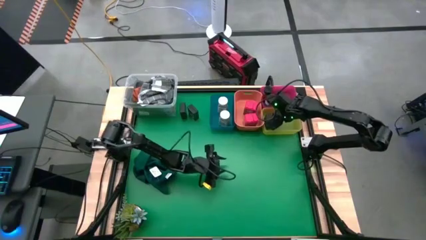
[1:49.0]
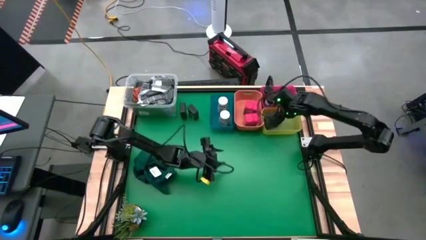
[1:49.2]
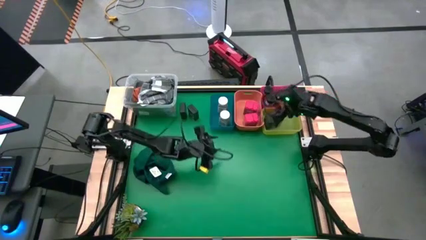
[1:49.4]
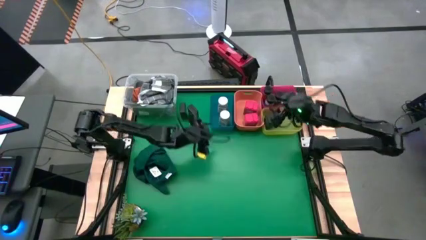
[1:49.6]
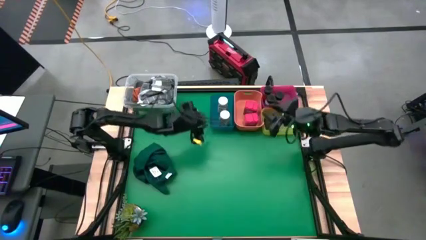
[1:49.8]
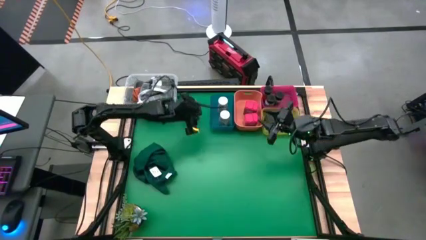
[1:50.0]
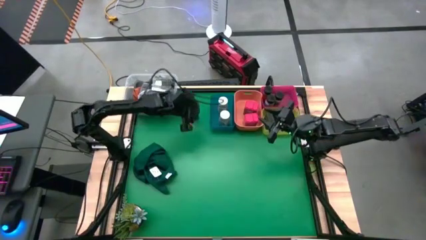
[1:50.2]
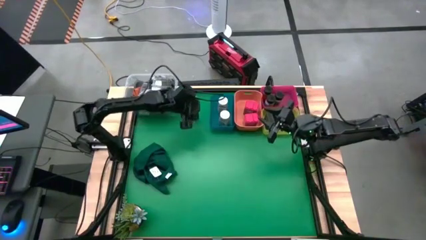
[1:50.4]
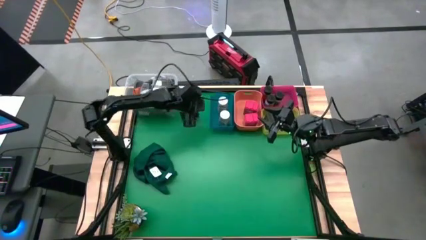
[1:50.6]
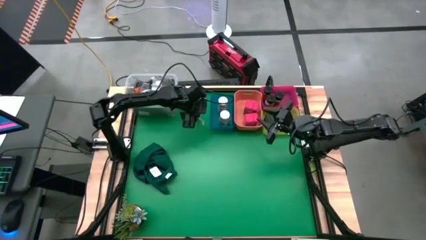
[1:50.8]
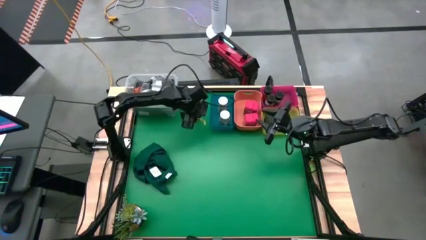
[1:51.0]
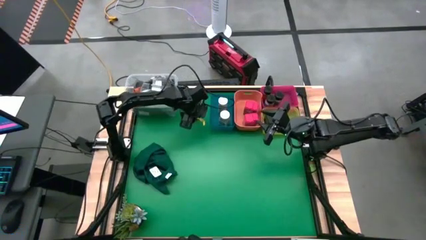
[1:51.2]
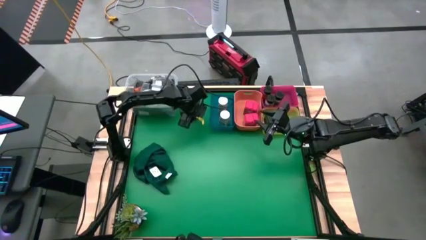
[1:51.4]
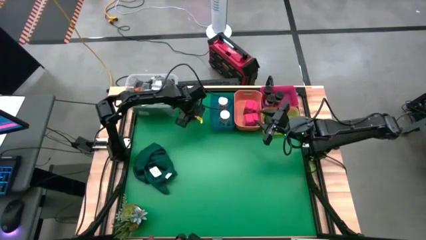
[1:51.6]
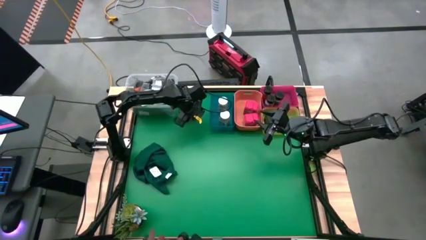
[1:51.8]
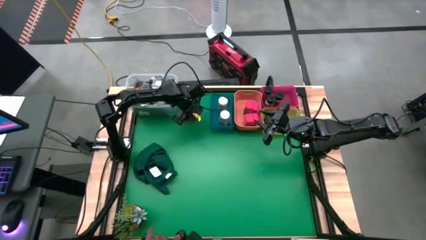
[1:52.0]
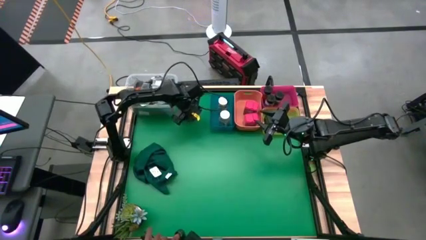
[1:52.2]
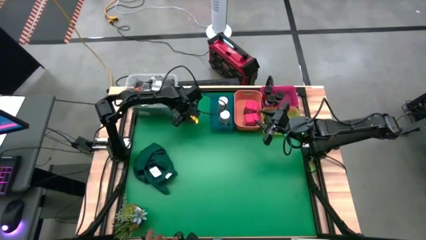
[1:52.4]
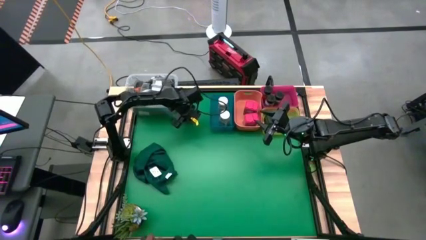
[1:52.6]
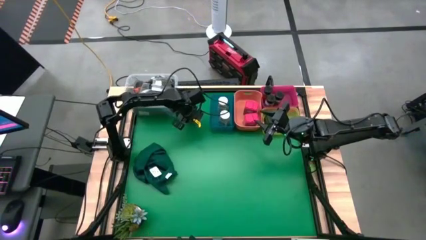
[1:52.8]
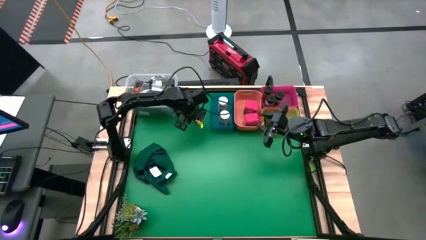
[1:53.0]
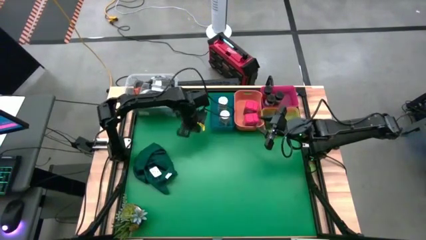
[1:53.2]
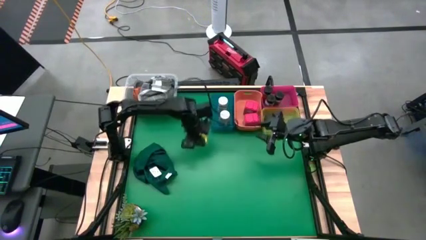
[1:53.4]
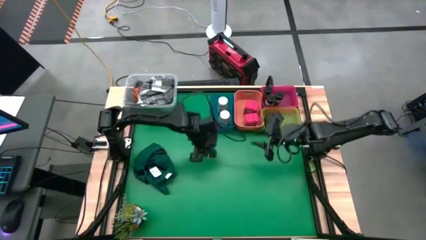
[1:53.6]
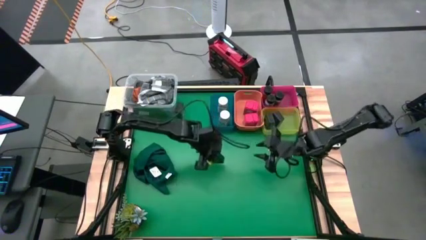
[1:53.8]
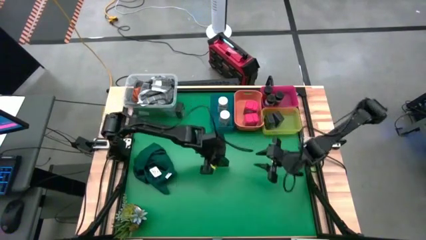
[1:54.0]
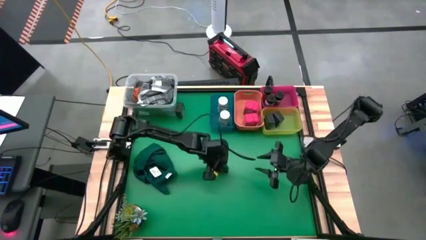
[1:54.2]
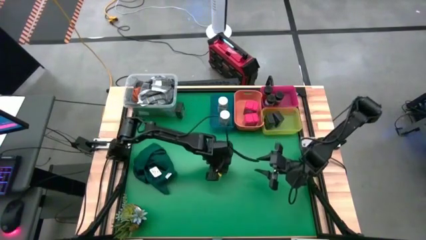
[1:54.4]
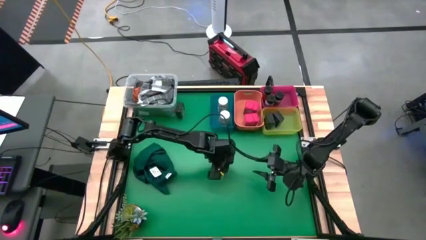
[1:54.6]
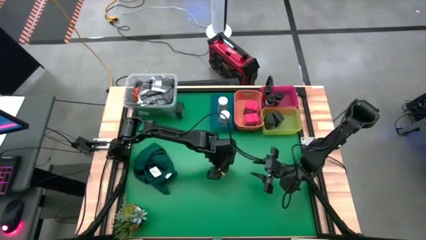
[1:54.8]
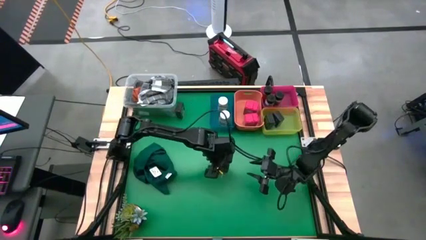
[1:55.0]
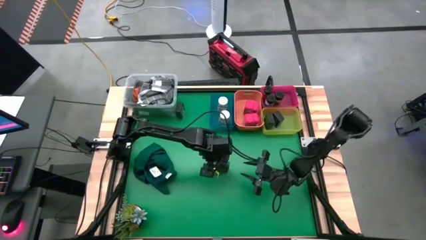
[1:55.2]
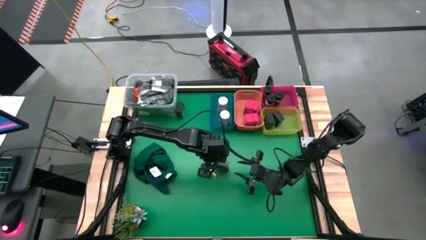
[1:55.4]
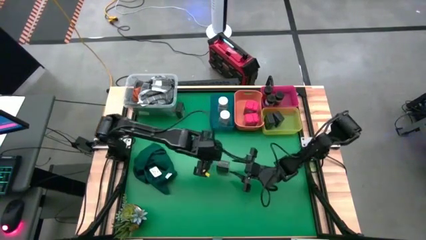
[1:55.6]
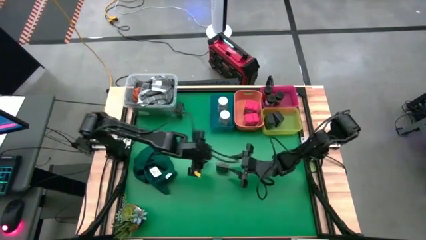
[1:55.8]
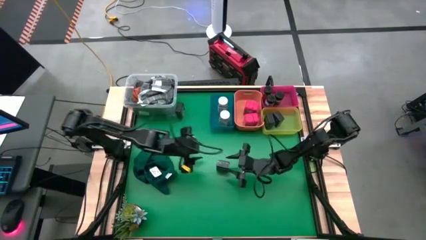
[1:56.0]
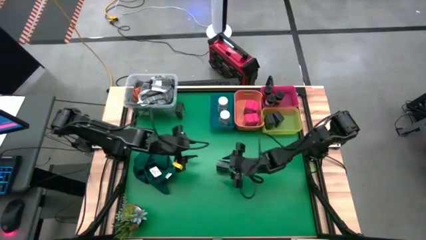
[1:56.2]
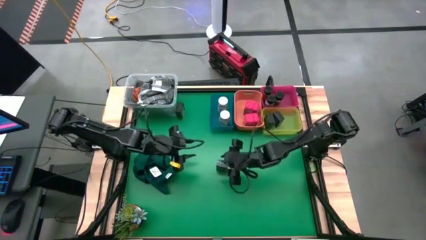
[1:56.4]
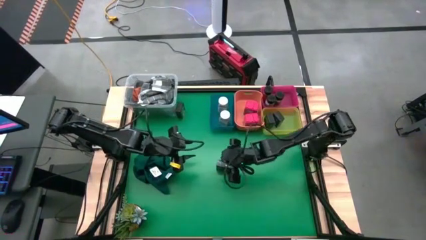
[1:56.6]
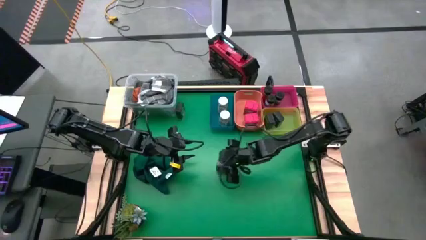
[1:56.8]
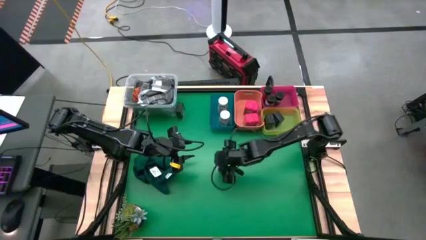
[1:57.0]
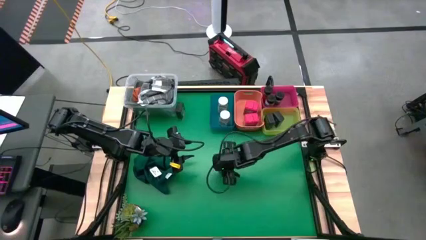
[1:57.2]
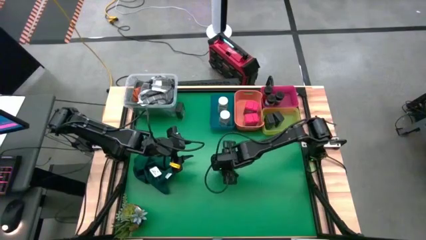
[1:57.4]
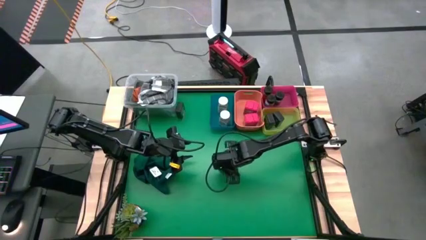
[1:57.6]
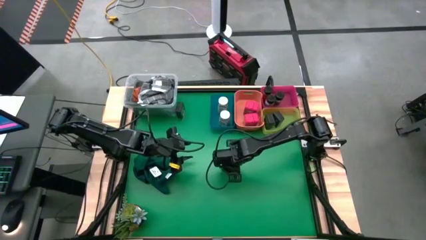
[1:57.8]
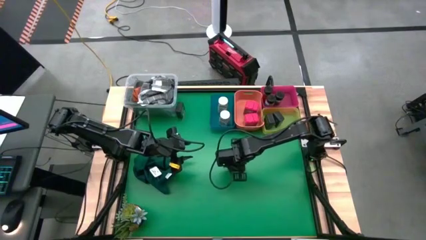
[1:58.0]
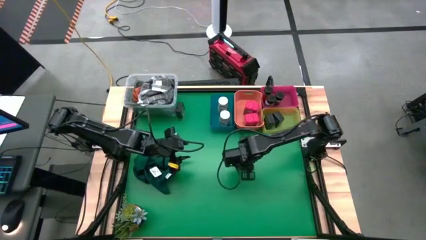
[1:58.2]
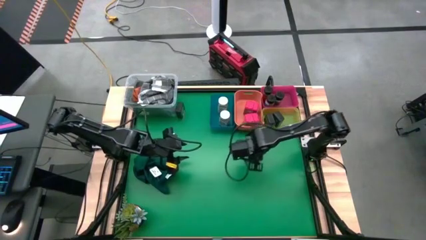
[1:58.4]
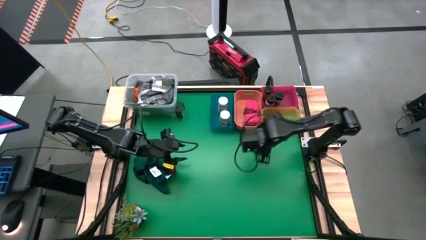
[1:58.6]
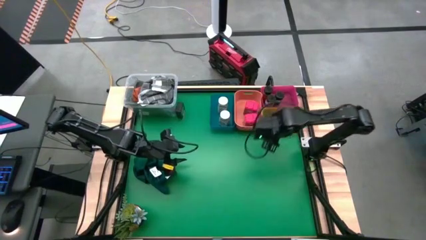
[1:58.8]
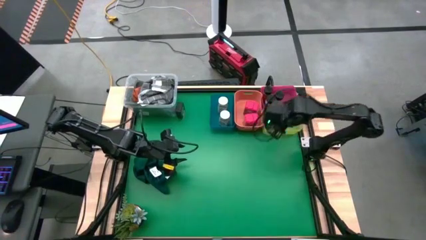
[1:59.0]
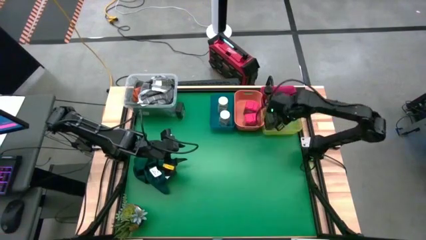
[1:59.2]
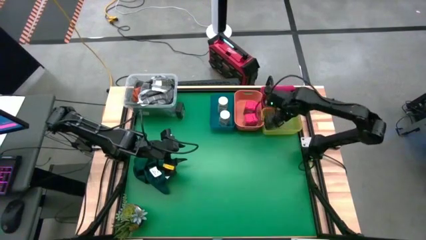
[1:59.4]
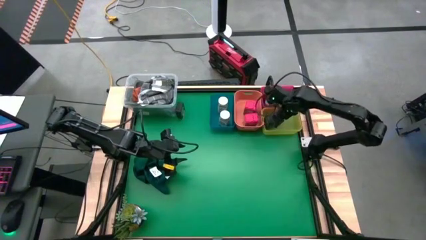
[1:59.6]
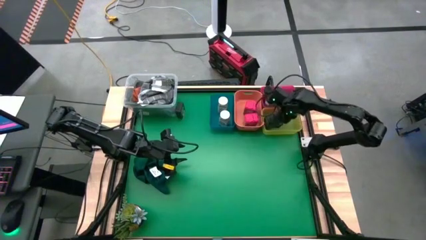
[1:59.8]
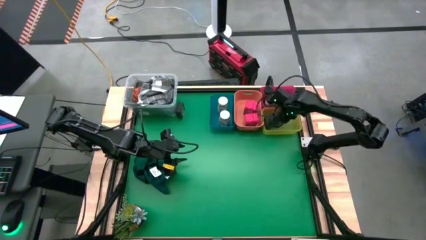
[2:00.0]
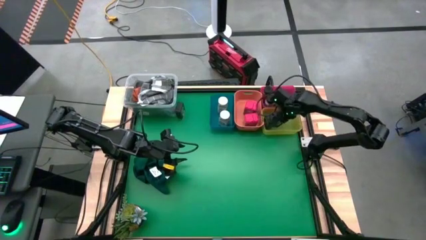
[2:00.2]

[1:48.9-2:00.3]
Task: Sort spices by type
Put the black seasoning can into the yellow bin

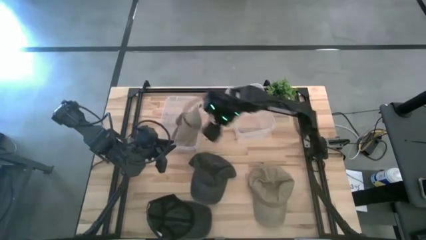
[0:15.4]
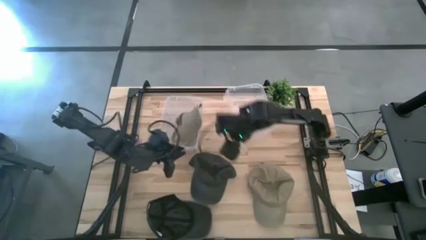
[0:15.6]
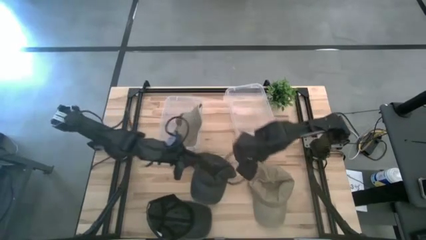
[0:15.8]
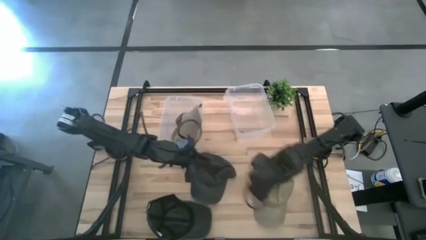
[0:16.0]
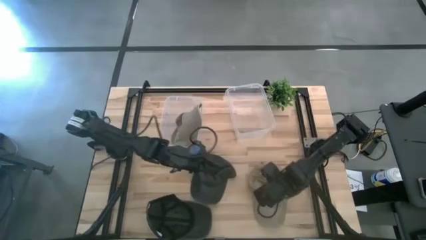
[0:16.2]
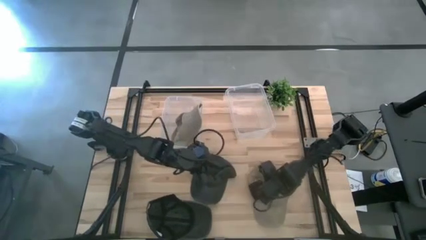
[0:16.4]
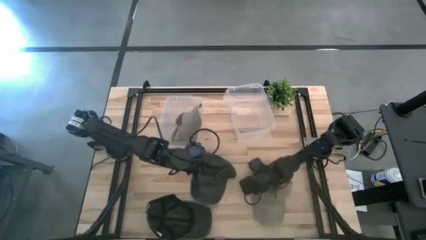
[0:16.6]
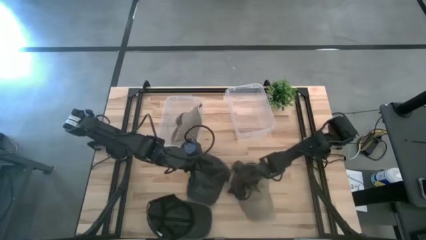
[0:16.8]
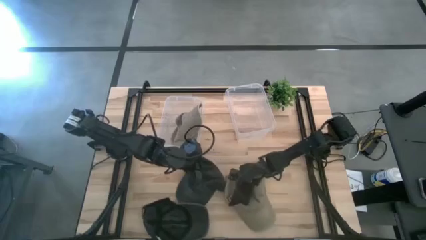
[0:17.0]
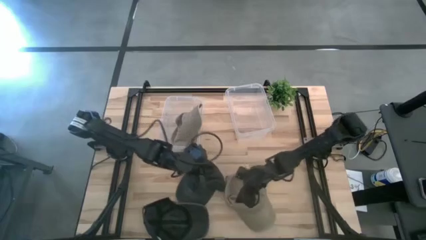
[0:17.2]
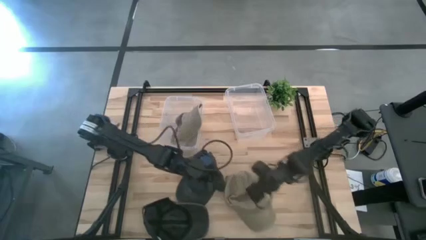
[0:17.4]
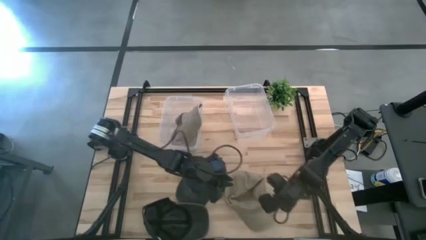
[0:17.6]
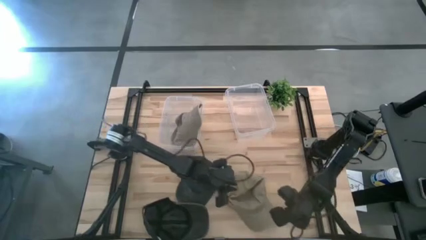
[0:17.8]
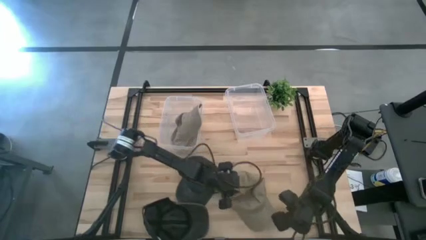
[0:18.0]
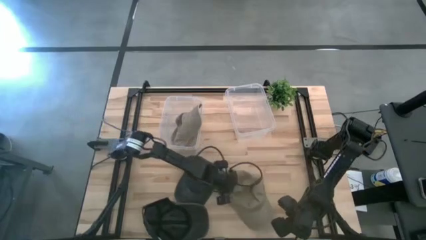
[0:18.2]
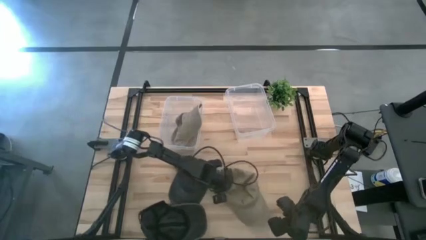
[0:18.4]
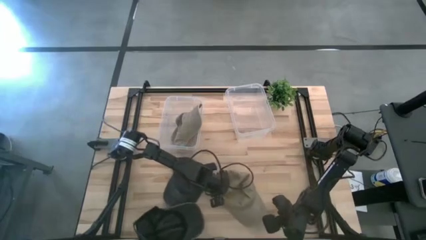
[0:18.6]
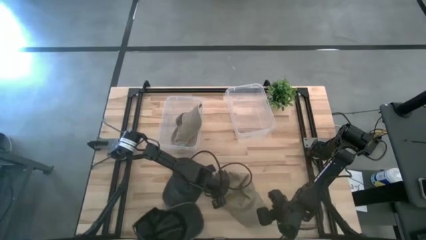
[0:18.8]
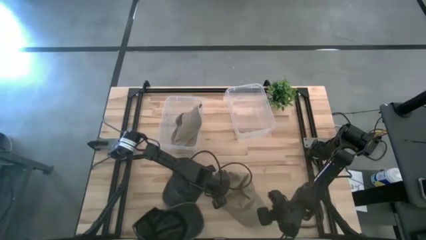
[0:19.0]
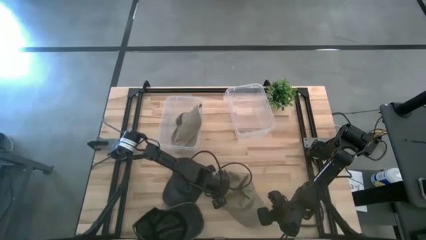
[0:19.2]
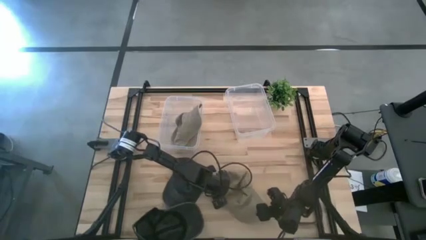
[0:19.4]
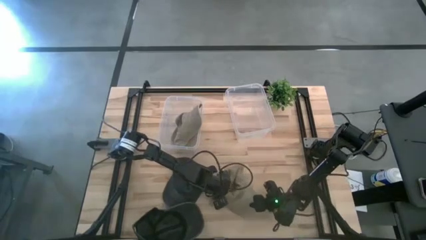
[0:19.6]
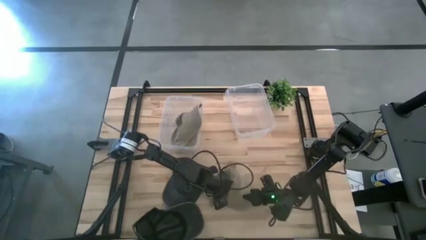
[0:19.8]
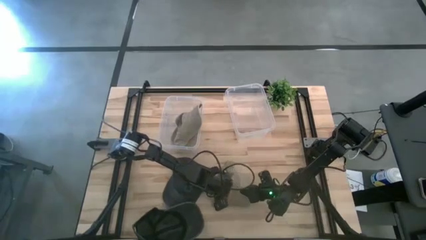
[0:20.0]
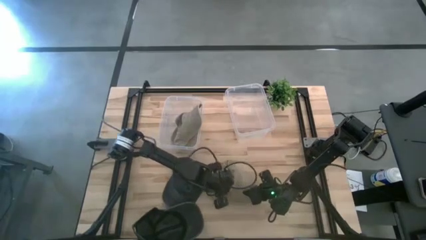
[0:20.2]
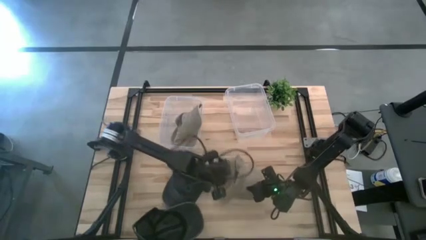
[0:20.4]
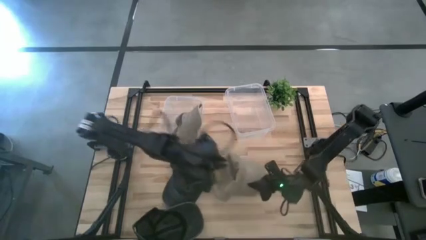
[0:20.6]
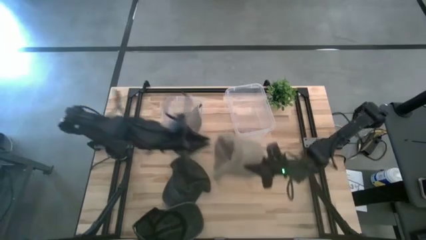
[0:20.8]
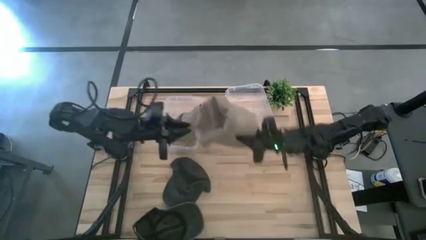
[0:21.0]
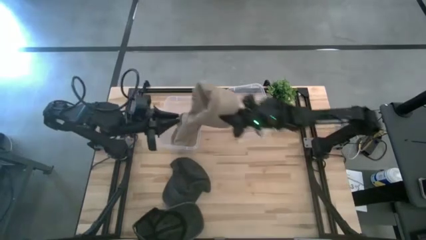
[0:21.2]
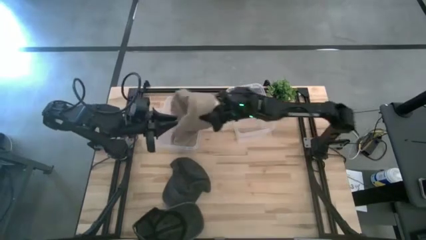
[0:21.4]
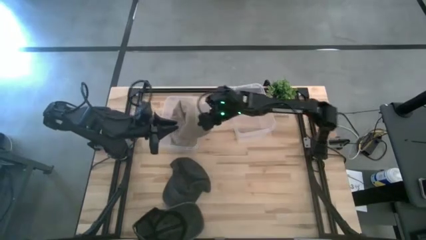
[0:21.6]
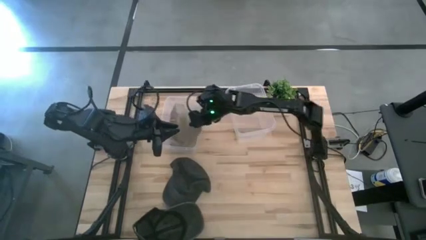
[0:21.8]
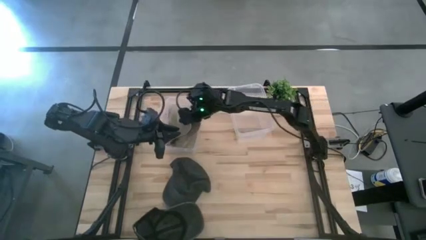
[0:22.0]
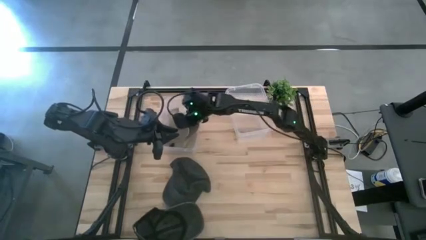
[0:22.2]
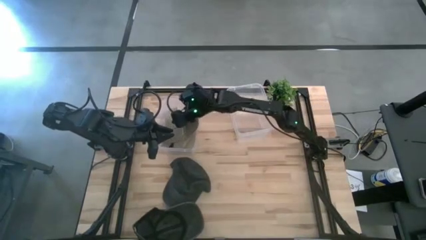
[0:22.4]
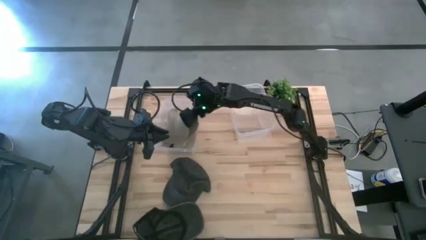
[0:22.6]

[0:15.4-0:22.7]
Task: Pick & Place hat
Put the brown cap into the left transparent bin
